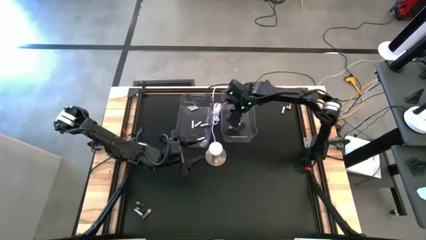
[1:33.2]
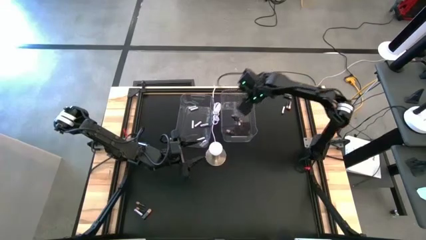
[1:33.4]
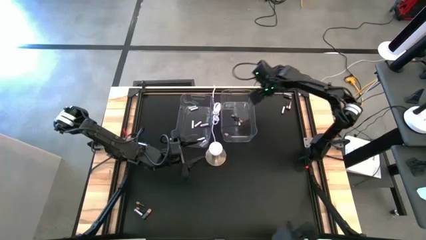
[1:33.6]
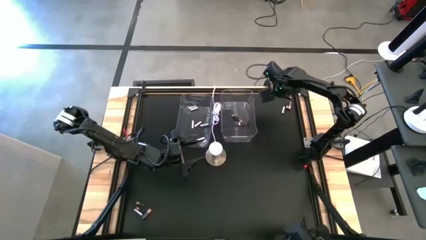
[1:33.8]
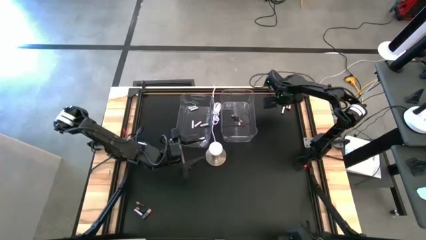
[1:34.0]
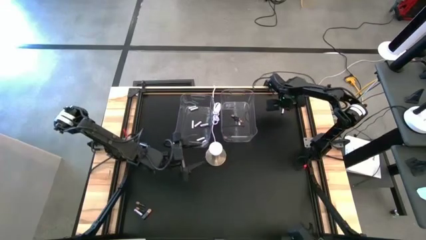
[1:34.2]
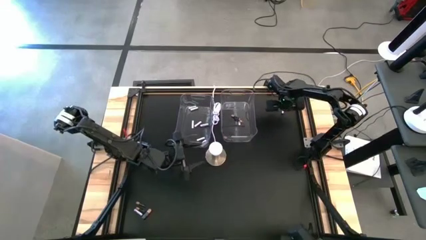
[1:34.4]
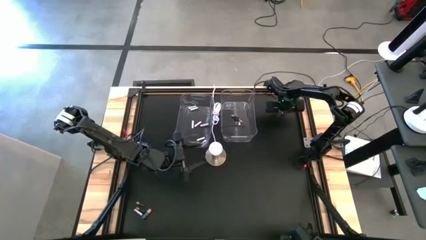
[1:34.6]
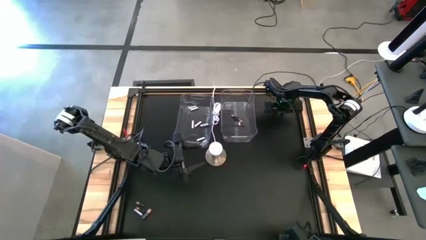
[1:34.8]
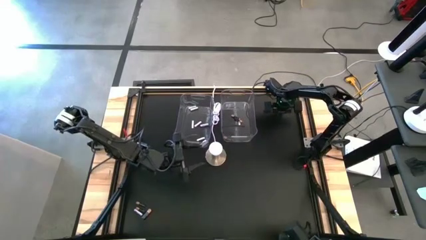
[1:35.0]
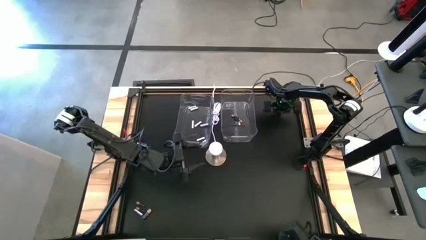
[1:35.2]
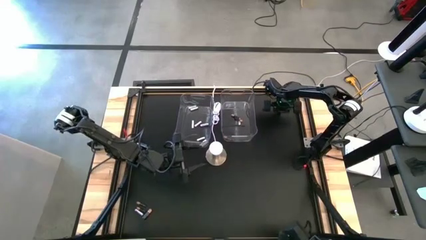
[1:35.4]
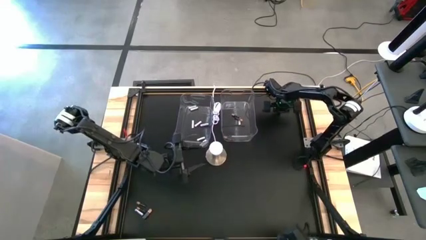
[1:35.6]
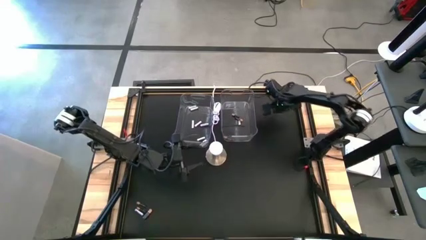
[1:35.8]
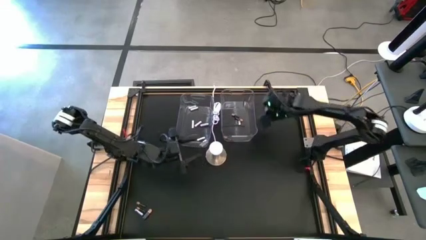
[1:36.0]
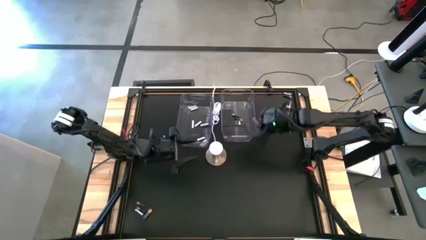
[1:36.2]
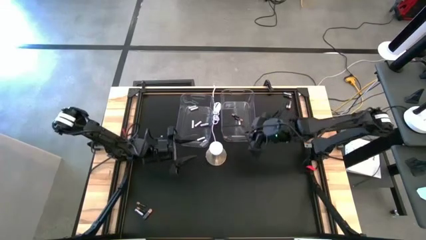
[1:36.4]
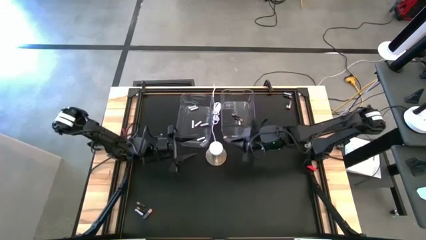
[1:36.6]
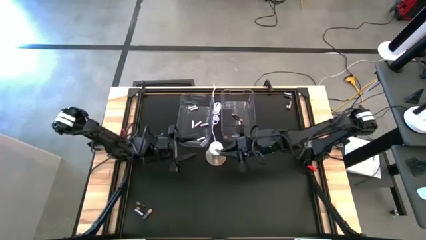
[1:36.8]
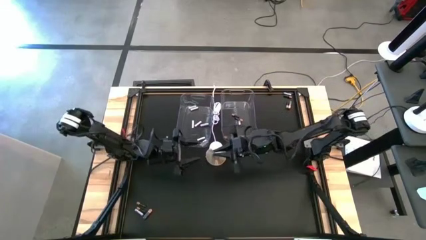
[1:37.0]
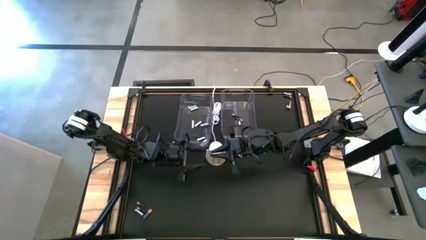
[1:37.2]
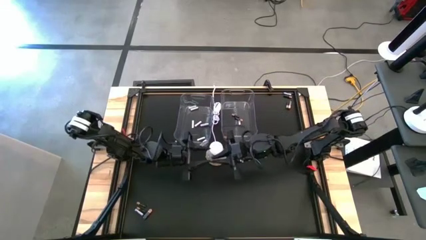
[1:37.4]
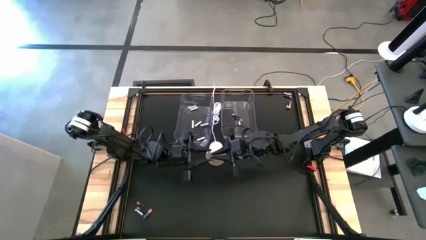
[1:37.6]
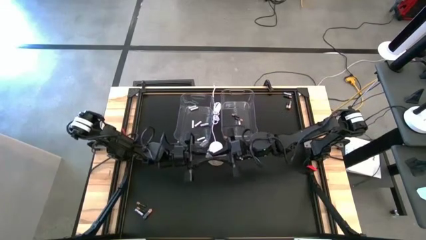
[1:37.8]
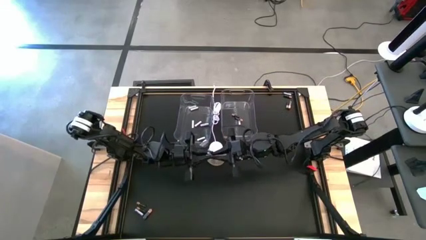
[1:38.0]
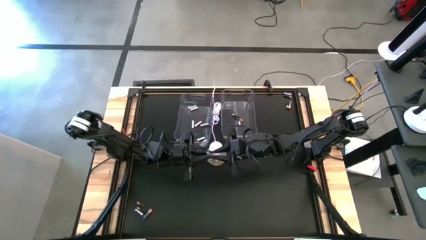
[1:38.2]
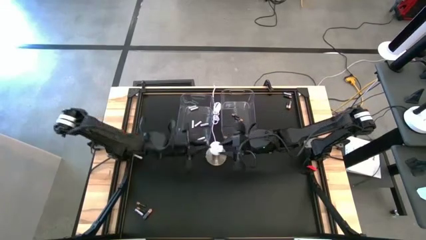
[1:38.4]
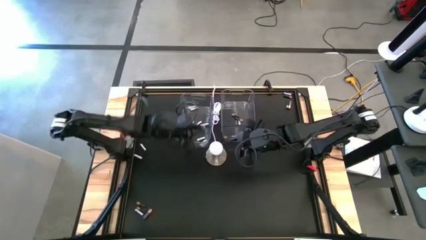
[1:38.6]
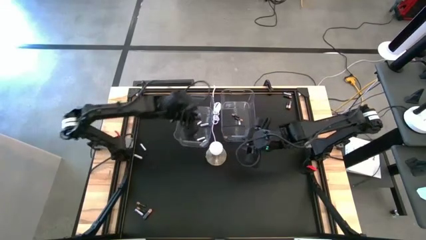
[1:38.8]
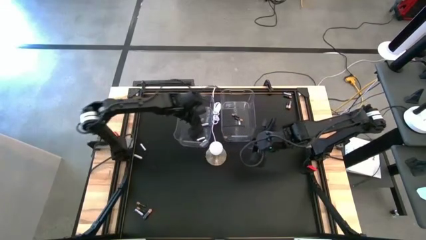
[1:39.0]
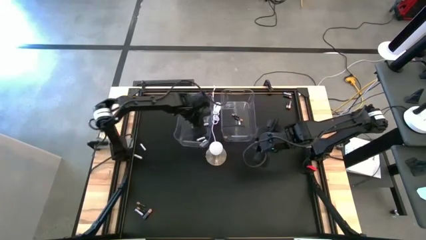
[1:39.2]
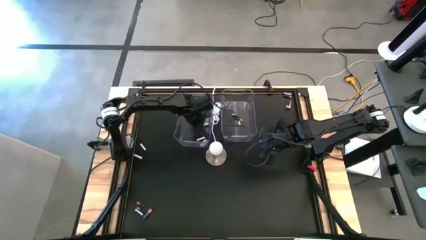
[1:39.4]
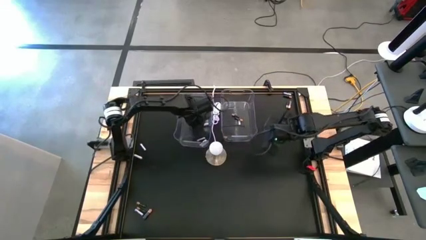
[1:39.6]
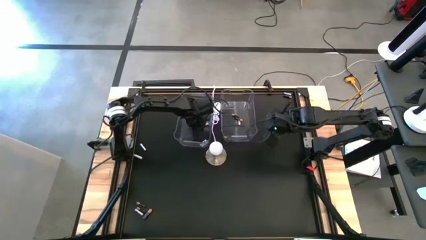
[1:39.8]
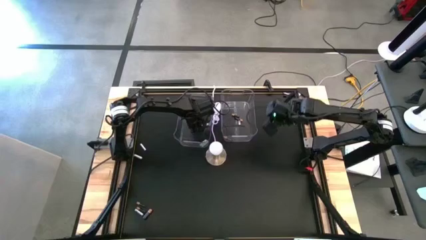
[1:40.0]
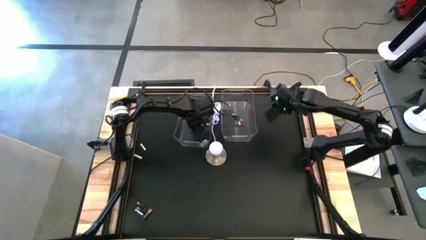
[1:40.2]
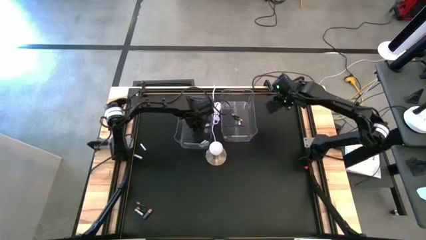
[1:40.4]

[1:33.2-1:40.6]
Task: Sort batteries
Put the white battery into the left transparent bin

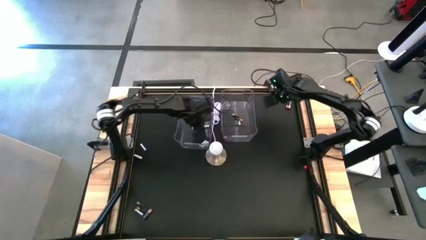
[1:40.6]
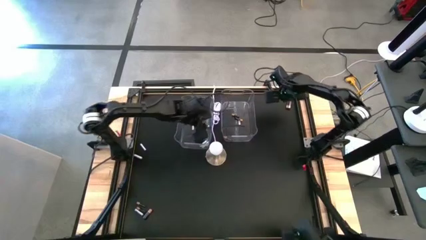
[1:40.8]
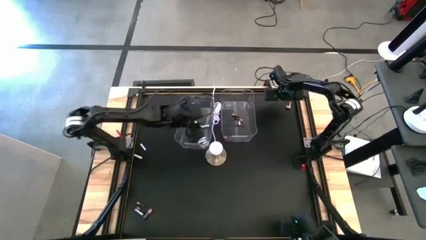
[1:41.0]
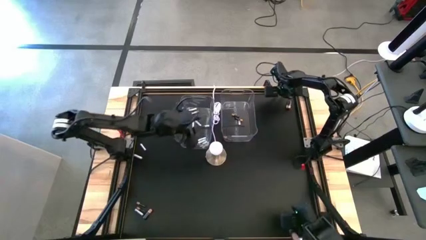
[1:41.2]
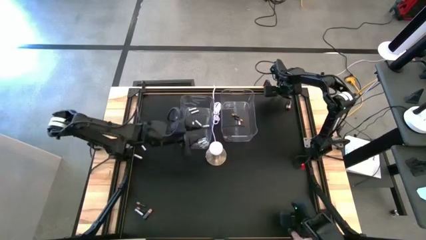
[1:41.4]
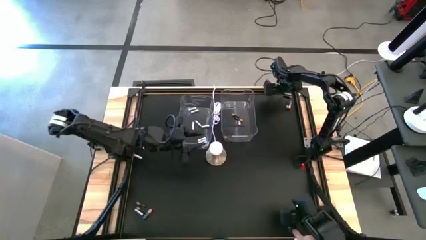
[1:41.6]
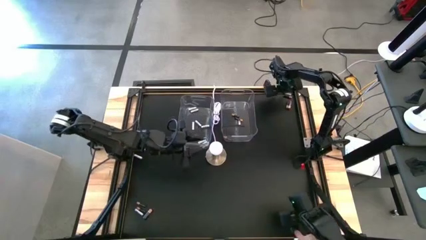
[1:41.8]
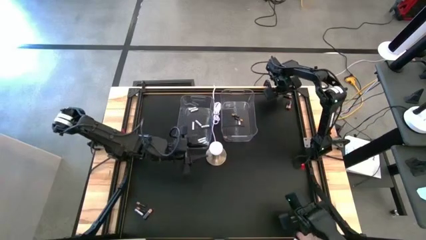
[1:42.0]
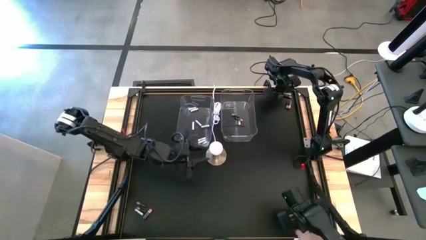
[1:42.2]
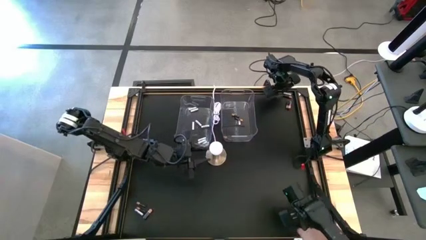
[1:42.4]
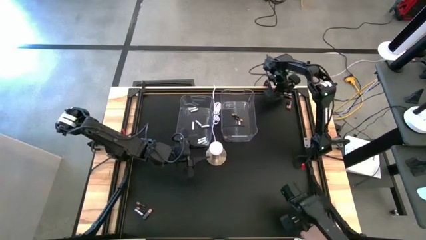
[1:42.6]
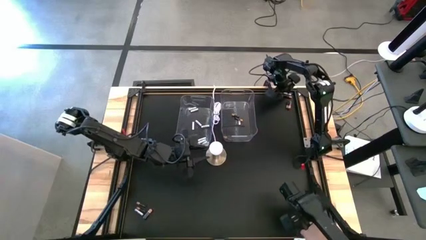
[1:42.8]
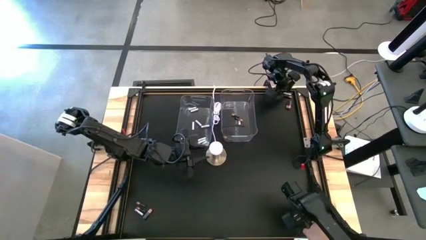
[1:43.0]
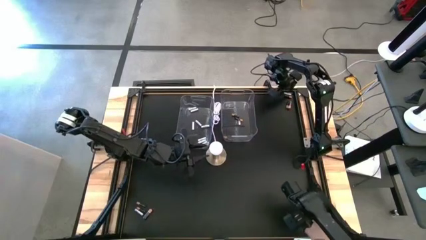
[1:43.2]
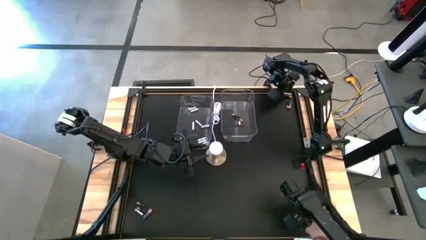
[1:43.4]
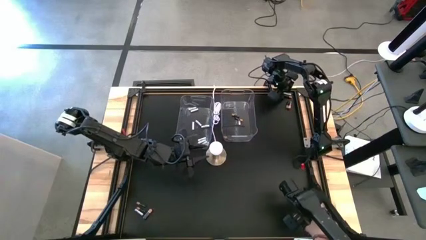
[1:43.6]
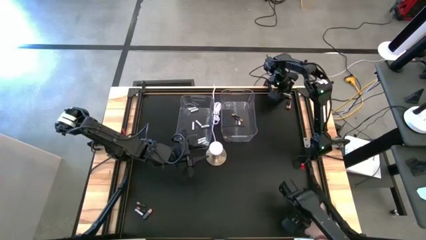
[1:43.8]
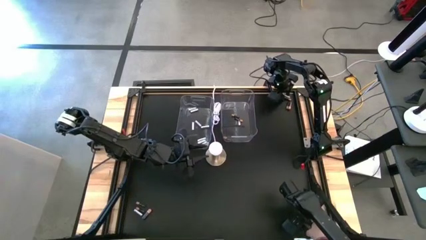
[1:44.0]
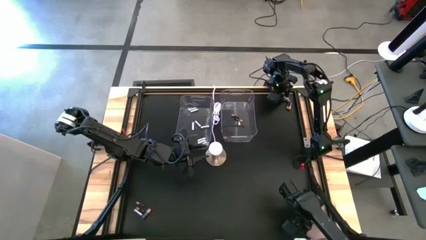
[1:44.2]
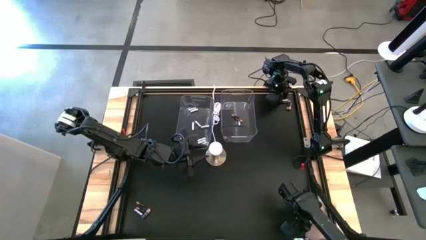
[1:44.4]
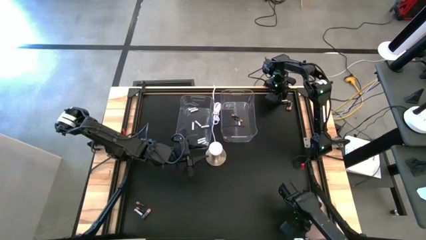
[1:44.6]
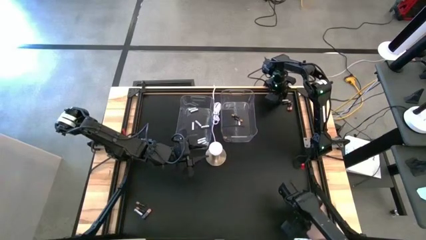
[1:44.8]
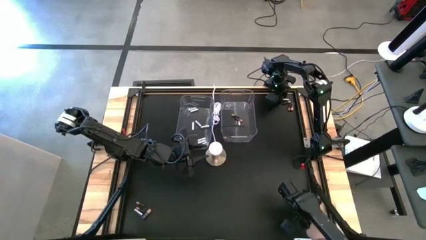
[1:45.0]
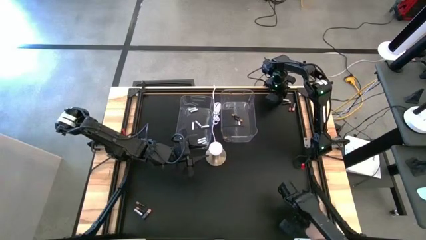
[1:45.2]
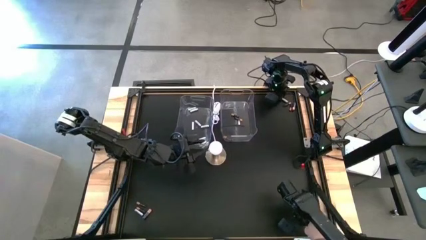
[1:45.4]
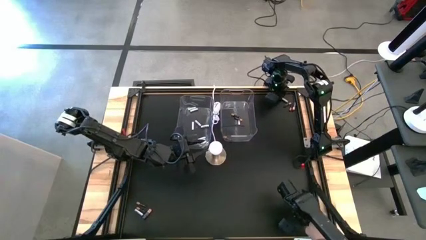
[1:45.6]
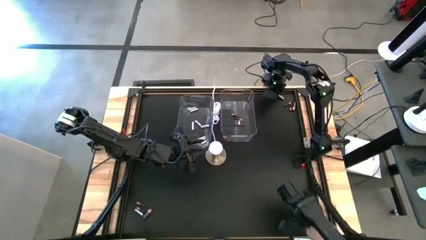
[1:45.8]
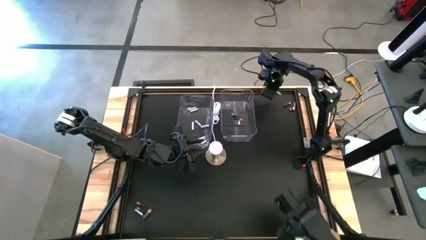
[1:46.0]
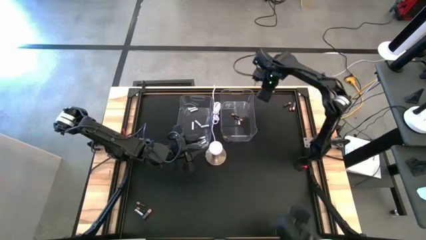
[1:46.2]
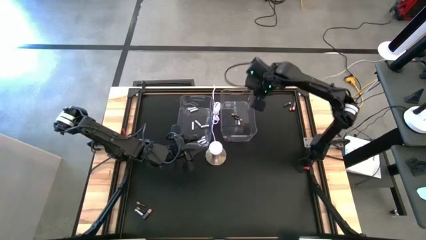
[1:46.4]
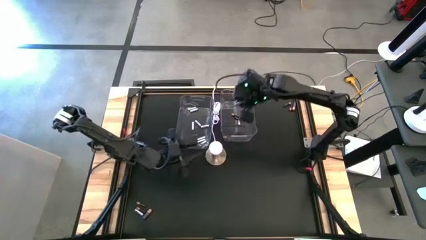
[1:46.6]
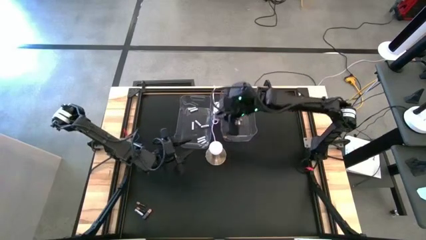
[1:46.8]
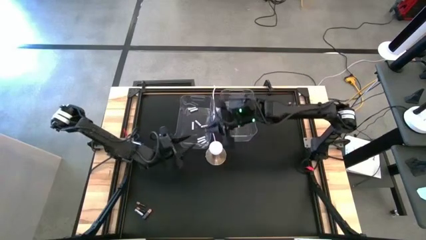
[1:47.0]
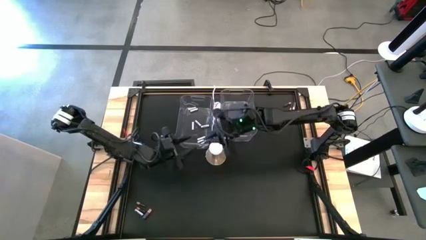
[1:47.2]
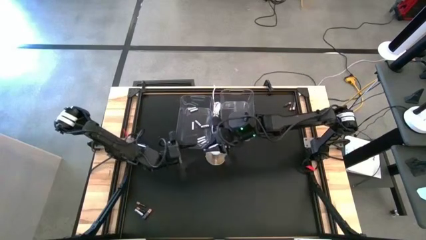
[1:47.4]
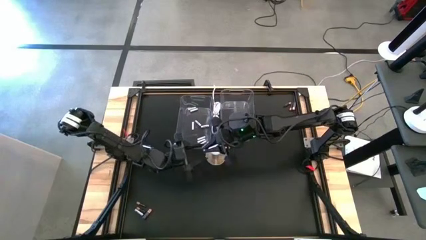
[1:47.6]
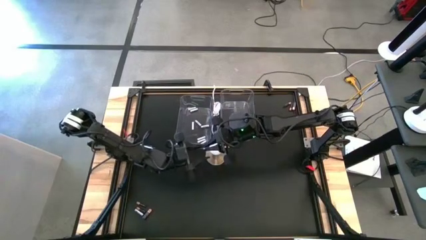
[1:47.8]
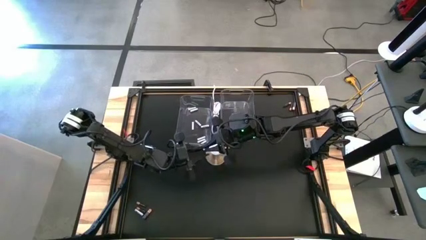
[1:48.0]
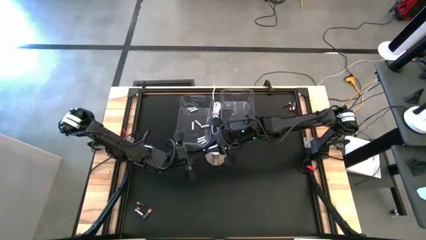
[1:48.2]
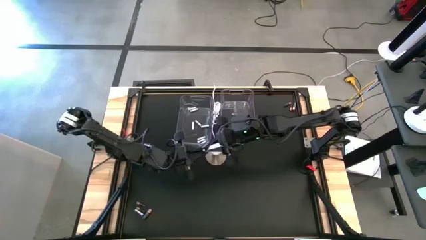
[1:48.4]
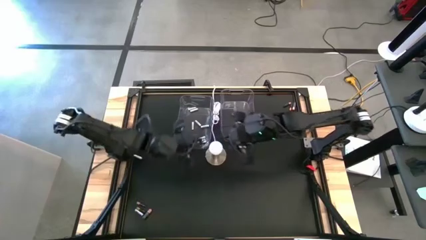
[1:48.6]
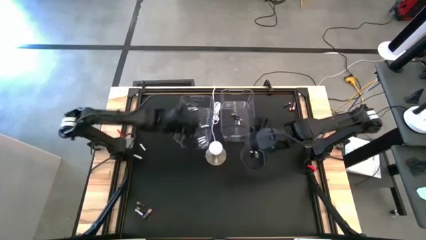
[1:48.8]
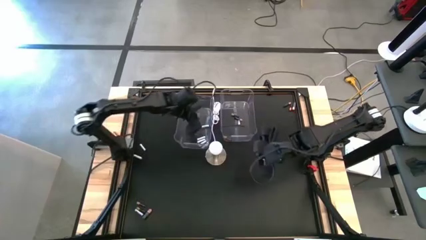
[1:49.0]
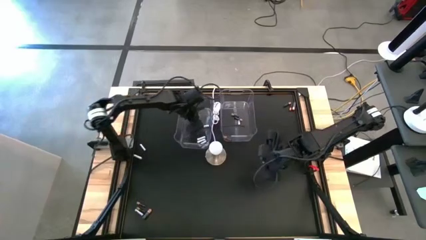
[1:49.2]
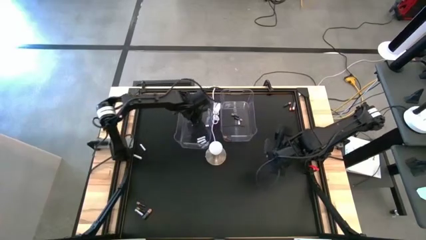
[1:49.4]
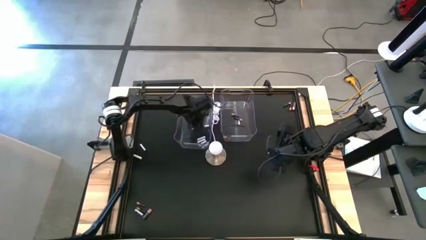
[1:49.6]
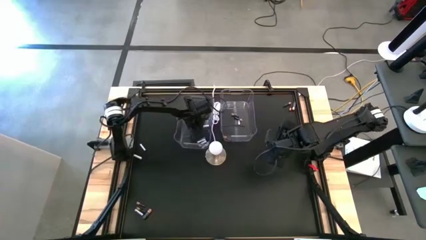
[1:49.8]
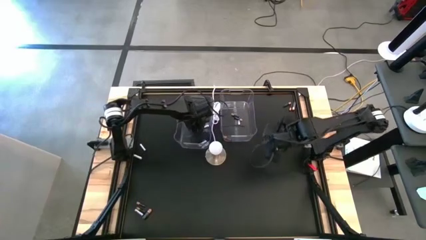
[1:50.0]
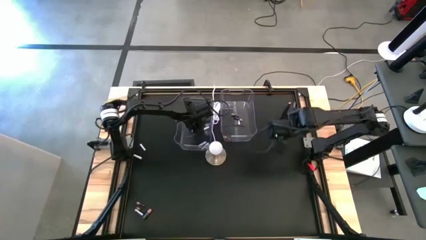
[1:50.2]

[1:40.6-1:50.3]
Put the white battery into the left transparent bin
